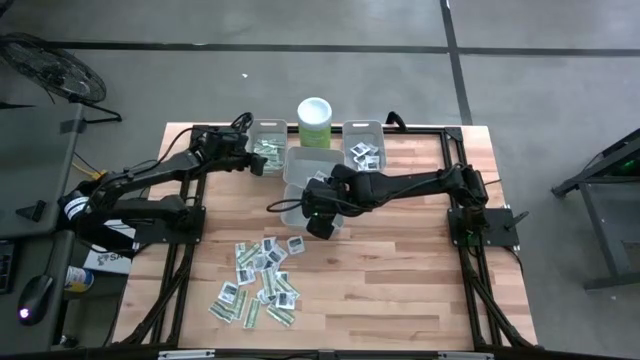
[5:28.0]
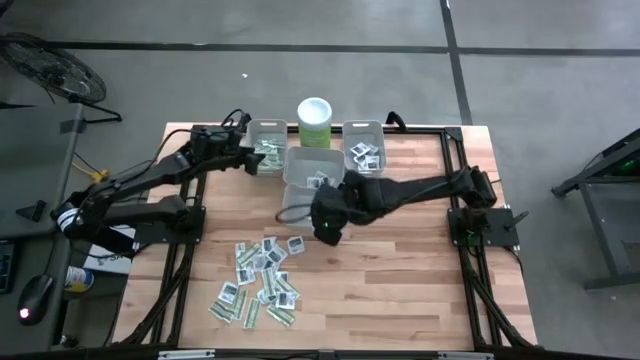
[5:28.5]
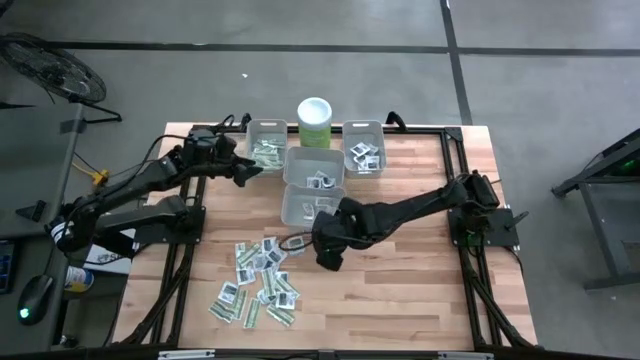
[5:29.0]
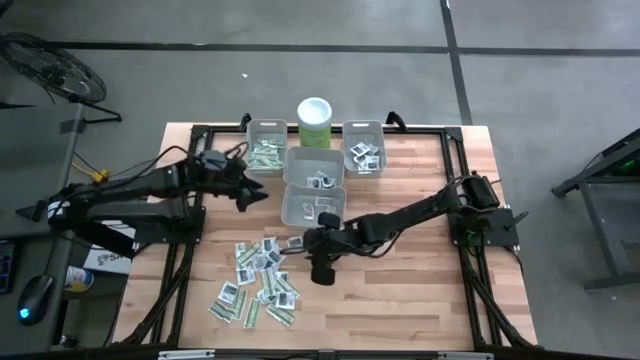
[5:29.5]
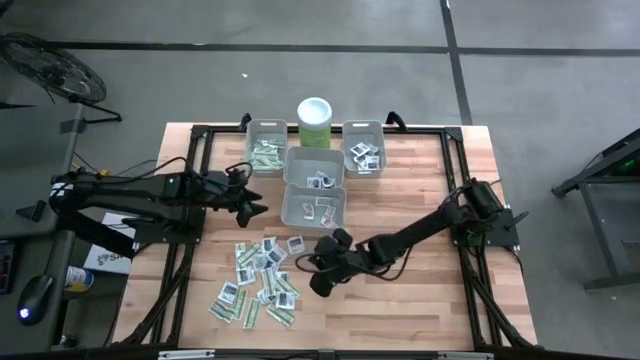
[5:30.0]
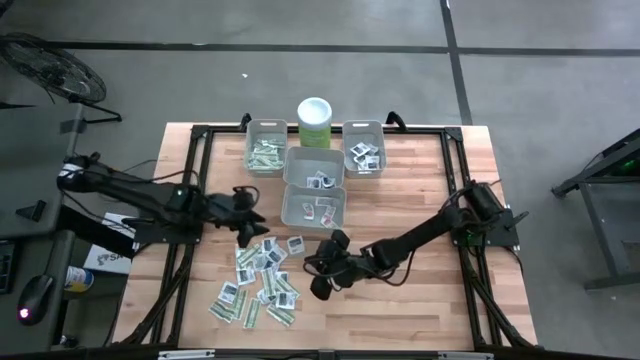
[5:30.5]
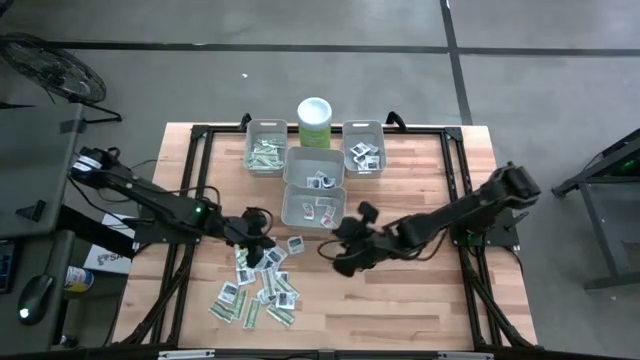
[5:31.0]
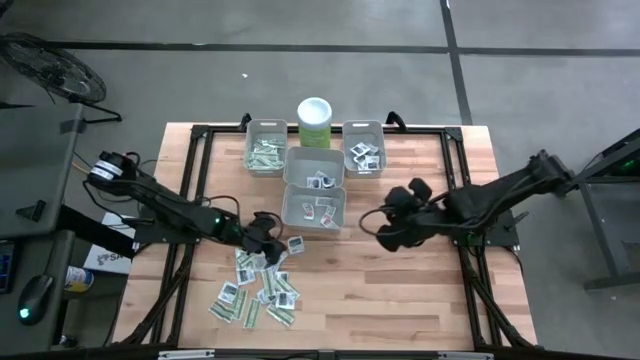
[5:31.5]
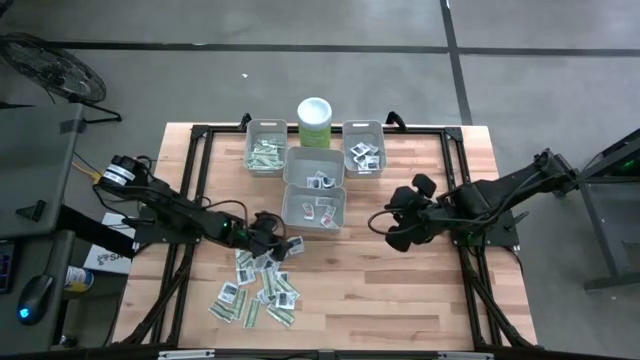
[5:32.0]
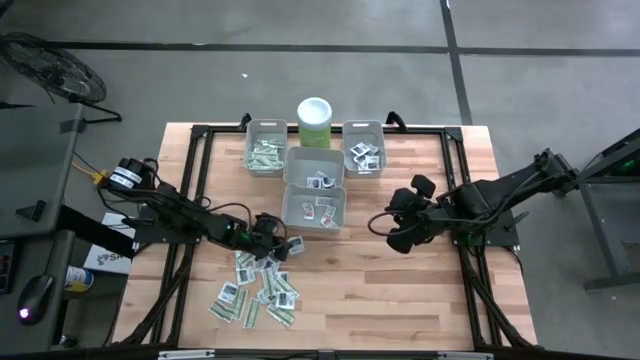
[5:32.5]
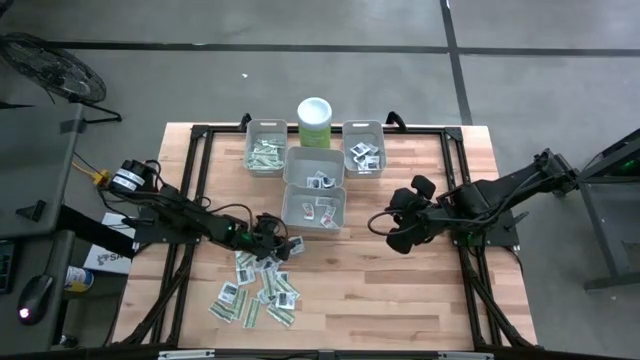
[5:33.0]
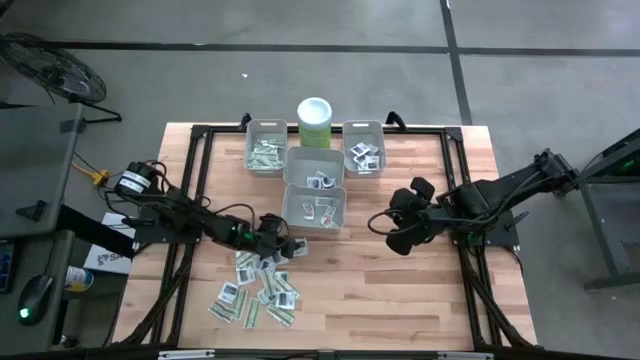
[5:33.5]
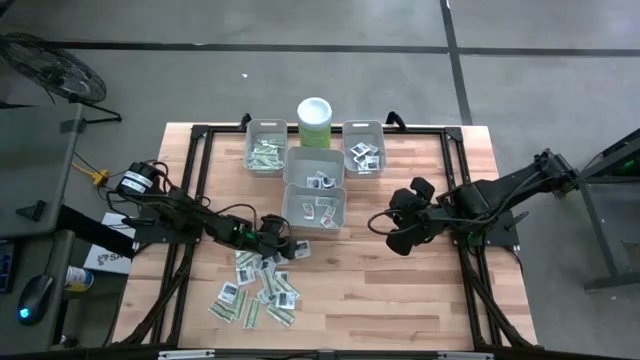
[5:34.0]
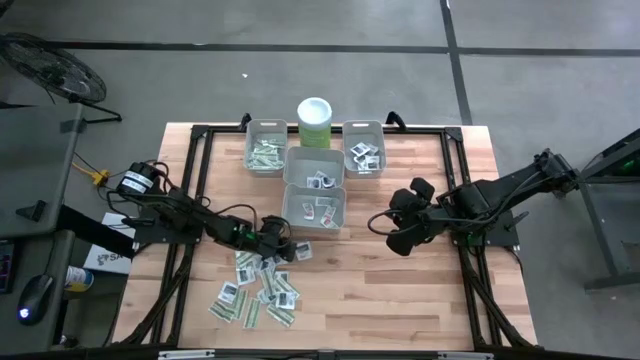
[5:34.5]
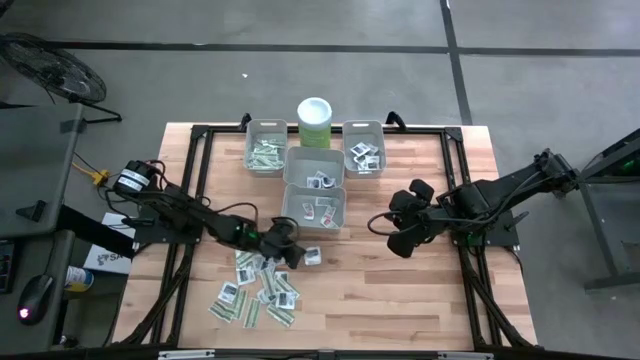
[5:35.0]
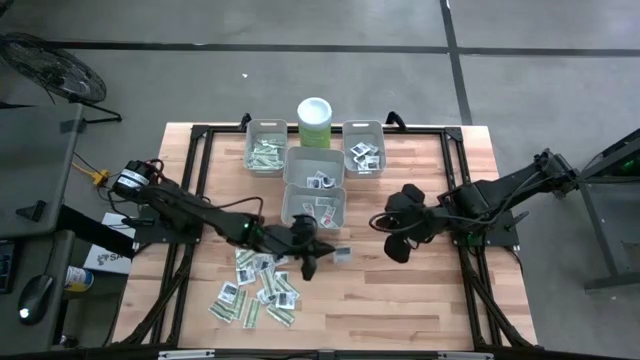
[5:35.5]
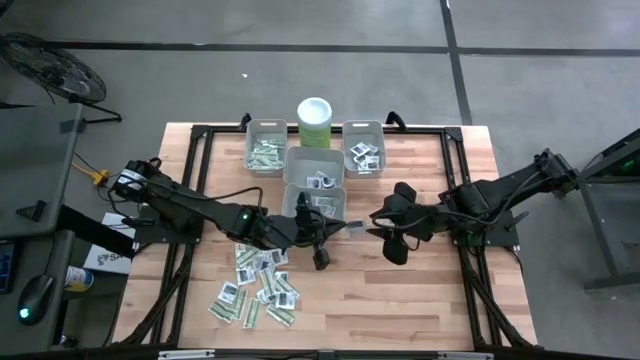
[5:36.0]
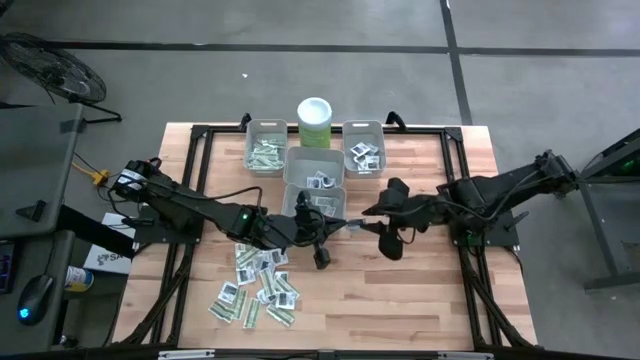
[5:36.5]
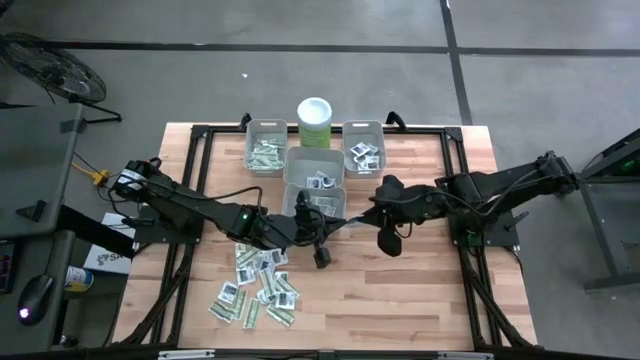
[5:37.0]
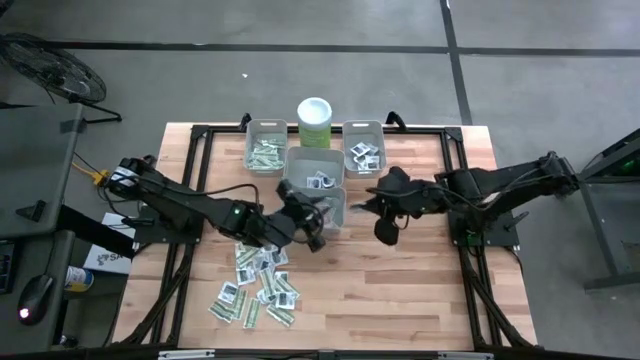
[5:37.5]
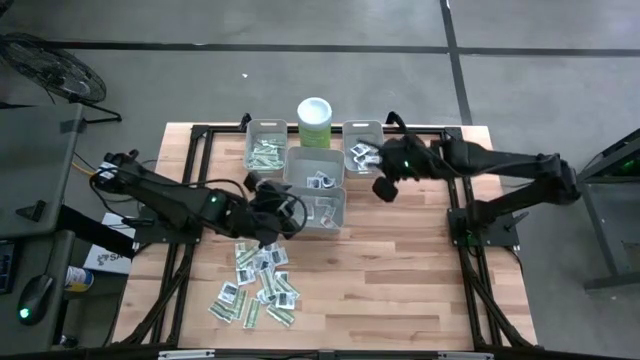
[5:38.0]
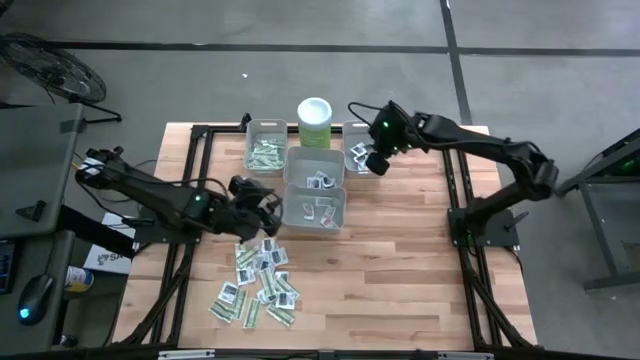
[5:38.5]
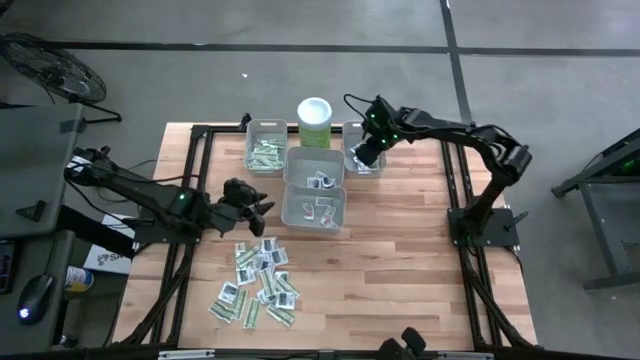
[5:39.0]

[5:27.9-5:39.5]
Task: Pick & Place First Aid Supplies
Put the towelette pack into the right bin

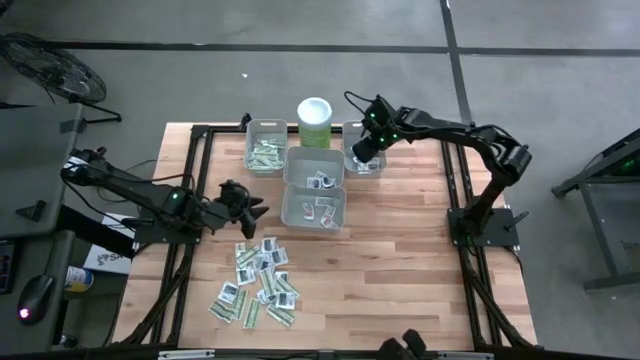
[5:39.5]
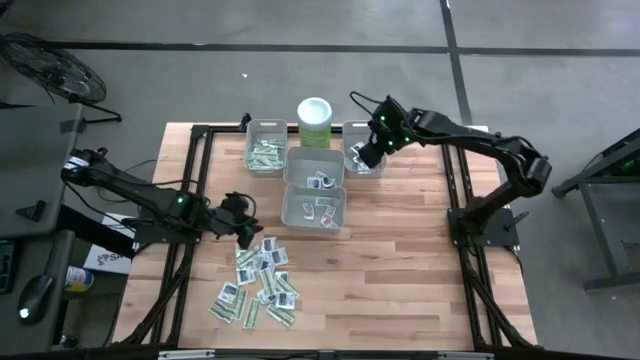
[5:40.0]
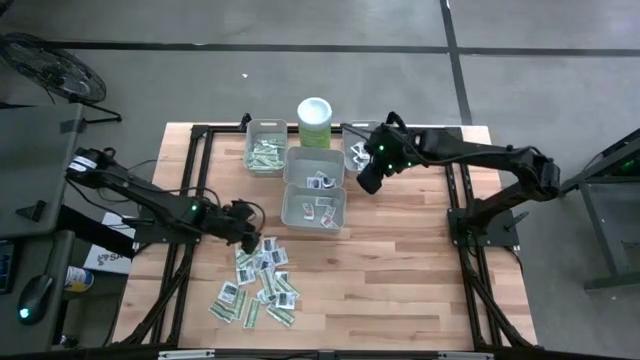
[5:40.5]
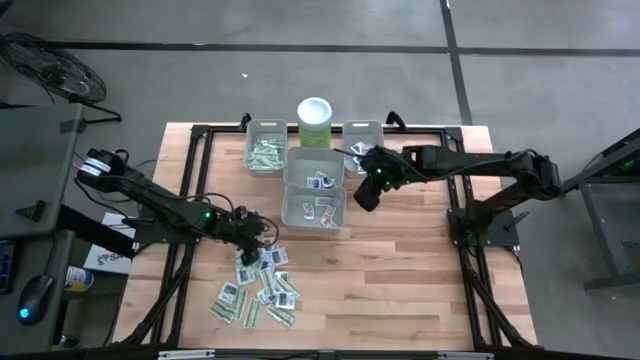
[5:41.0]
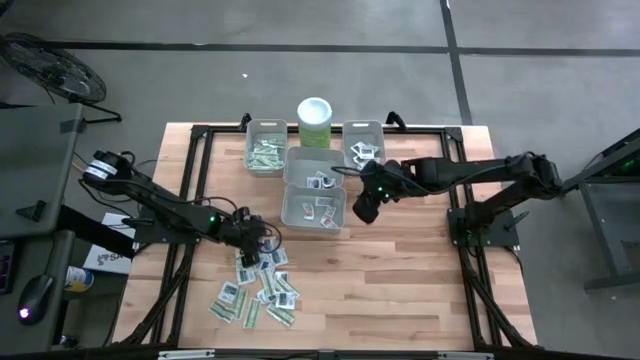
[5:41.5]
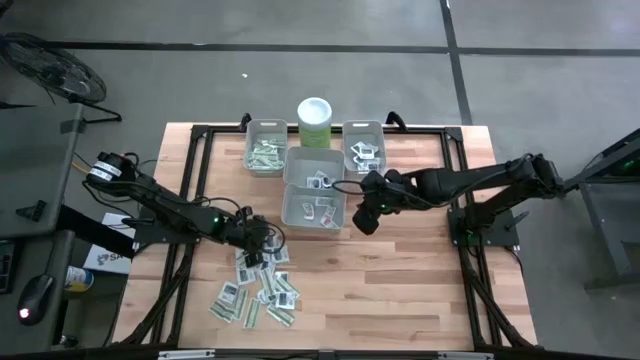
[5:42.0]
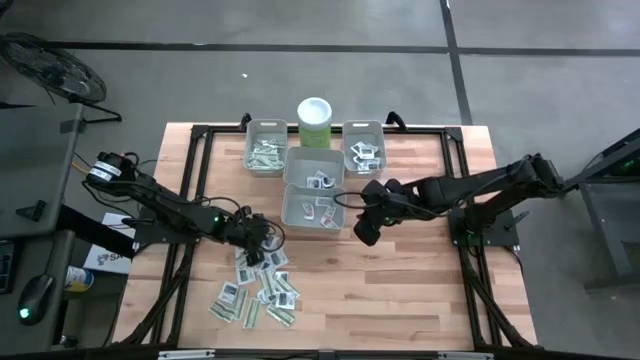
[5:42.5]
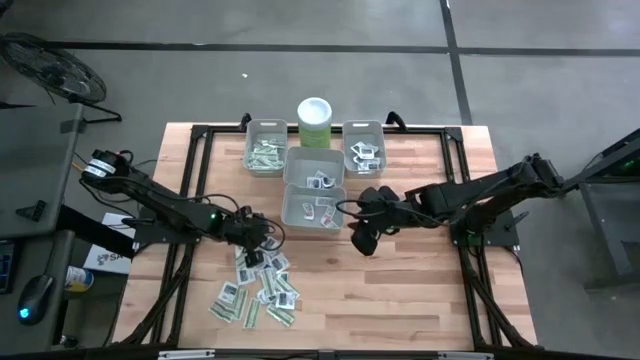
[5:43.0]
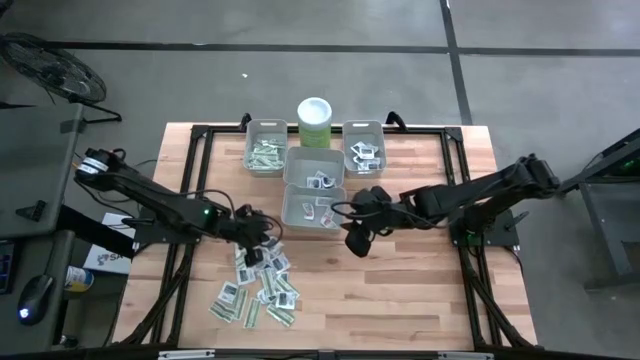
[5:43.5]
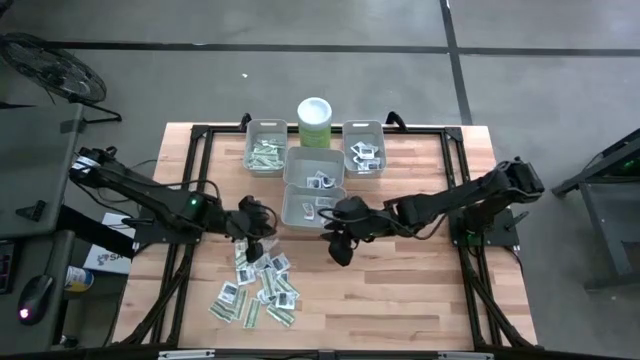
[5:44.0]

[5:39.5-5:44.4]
Put the towelette pack into the right bin

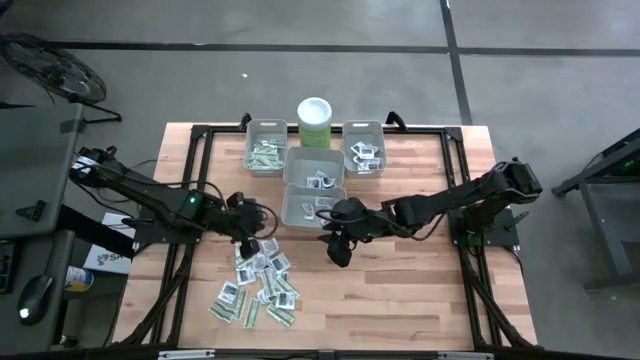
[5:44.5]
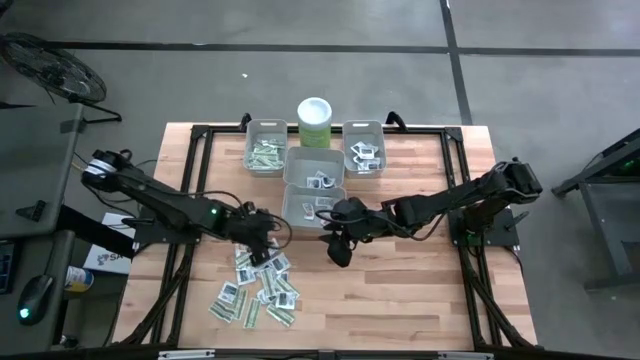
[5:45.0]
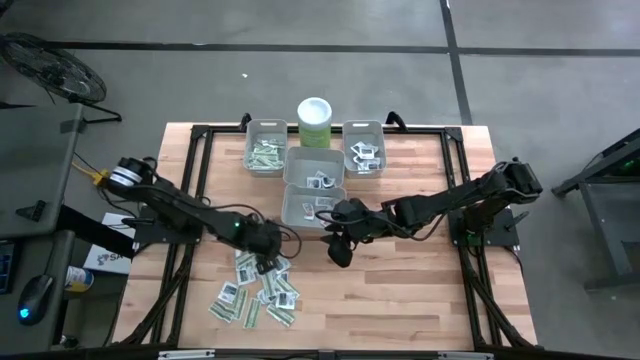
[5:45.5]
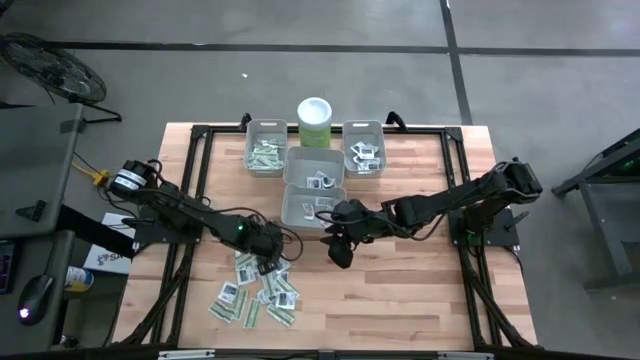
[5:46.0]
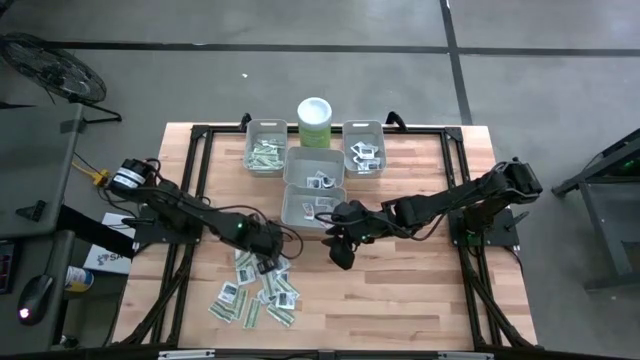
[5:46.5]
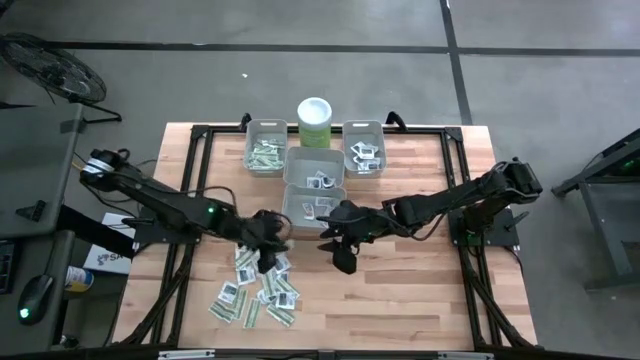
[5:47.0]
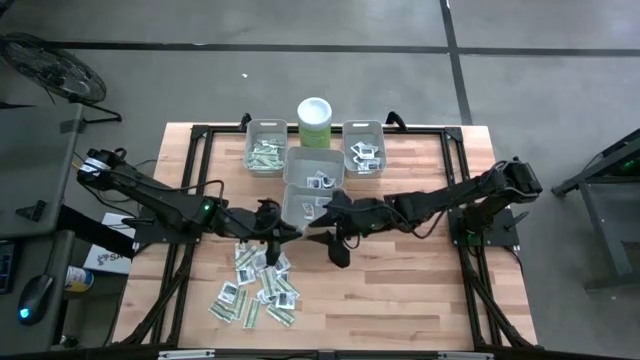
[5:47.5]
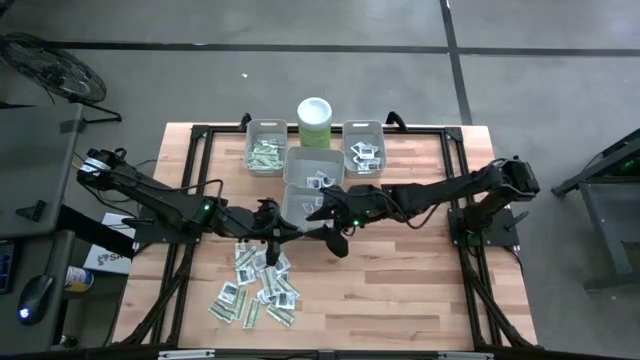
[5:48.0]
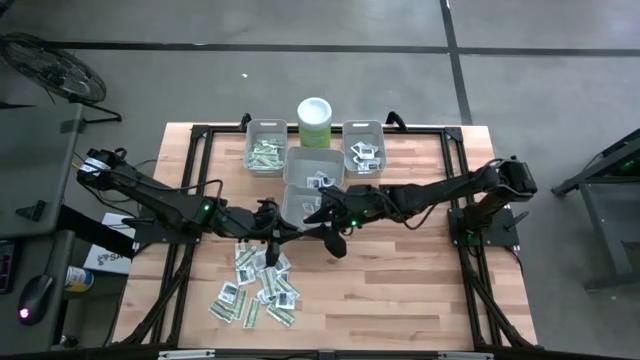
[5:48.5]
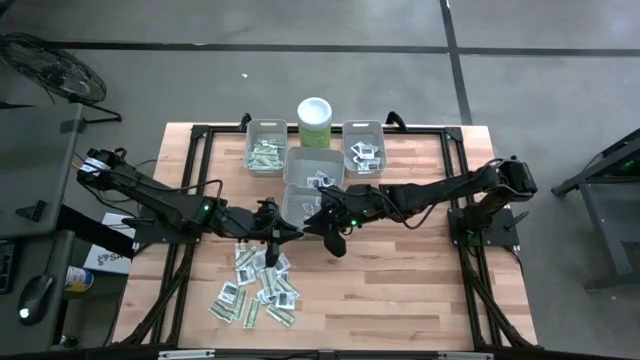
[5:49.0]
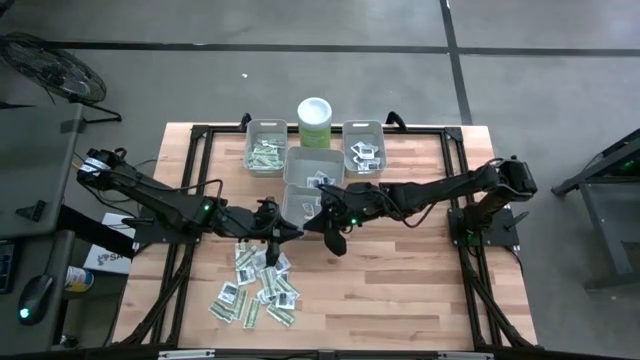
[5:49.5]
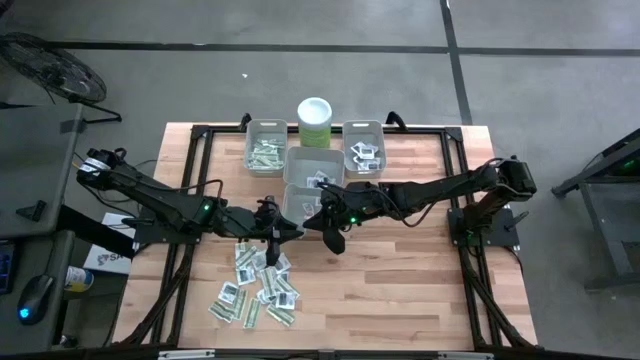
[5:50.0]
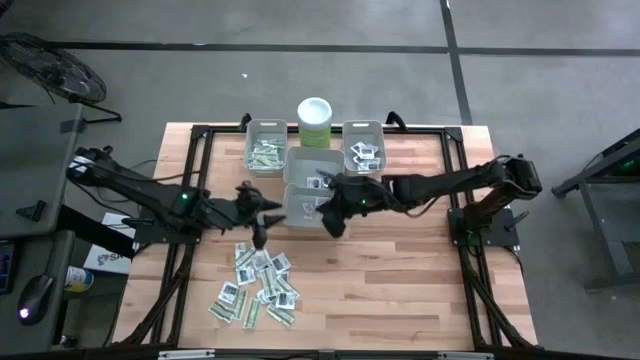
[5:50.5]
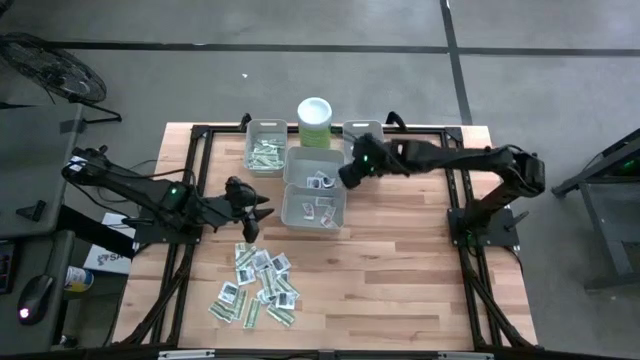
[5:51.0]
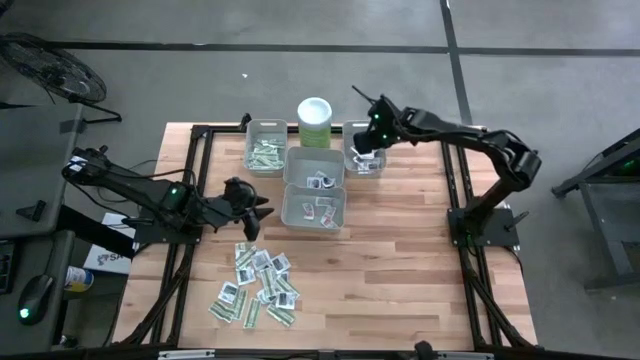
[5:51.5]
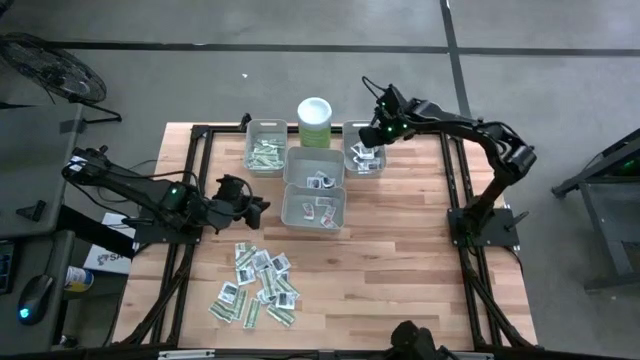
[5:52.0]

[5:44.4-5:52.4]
Put the towelette pack into the right bin
